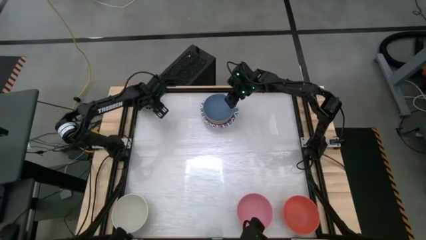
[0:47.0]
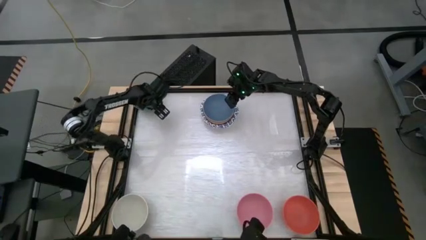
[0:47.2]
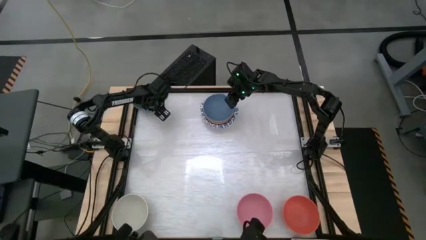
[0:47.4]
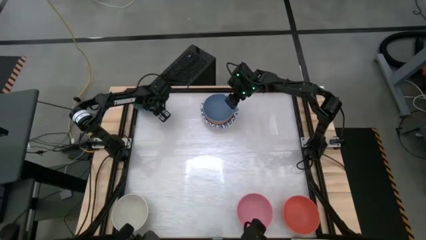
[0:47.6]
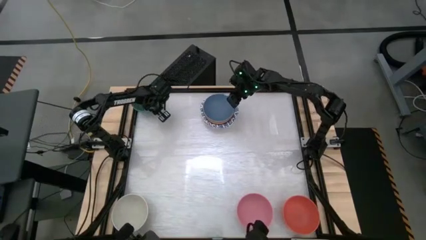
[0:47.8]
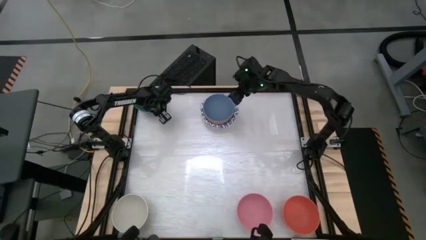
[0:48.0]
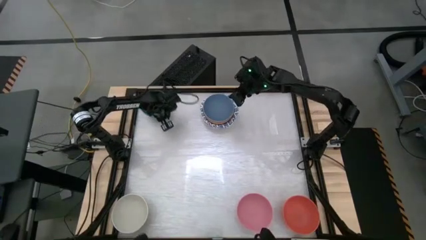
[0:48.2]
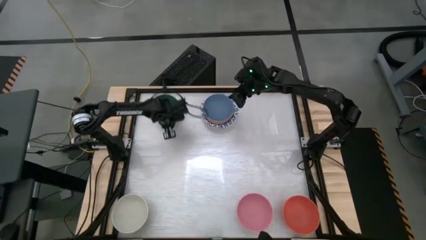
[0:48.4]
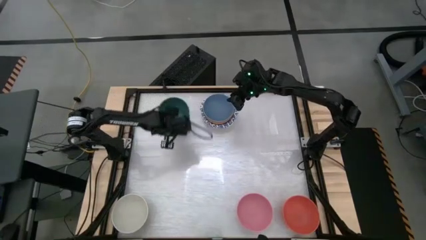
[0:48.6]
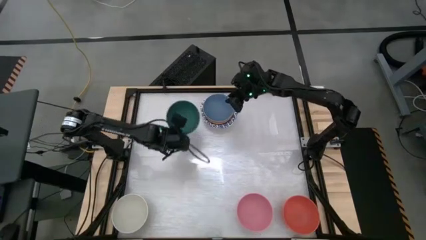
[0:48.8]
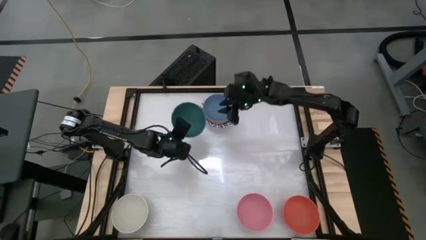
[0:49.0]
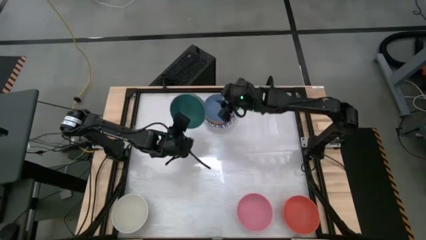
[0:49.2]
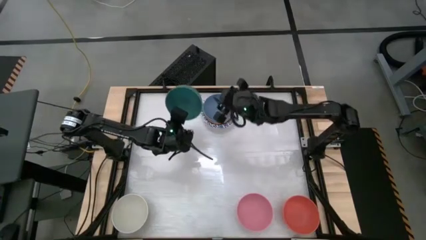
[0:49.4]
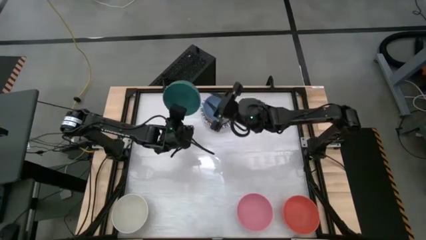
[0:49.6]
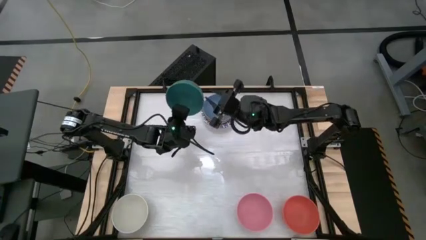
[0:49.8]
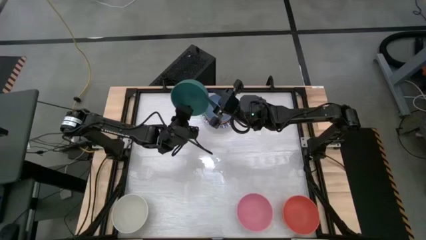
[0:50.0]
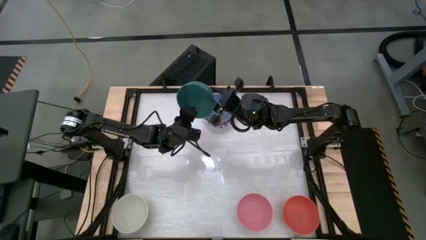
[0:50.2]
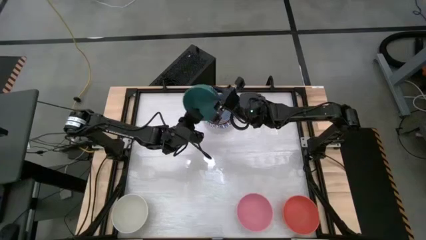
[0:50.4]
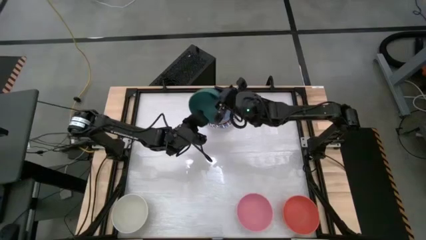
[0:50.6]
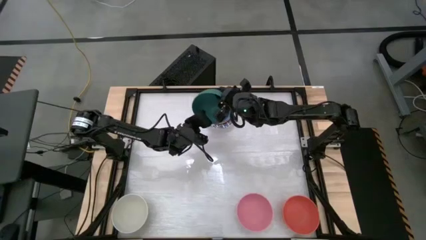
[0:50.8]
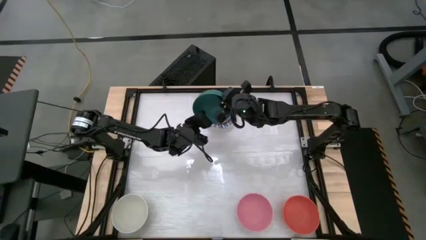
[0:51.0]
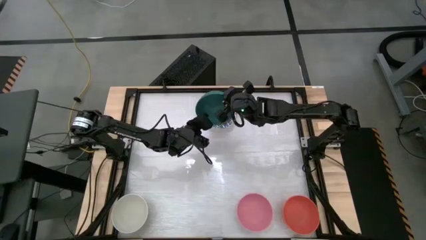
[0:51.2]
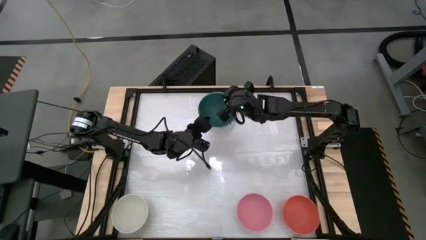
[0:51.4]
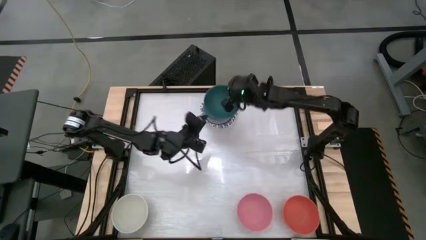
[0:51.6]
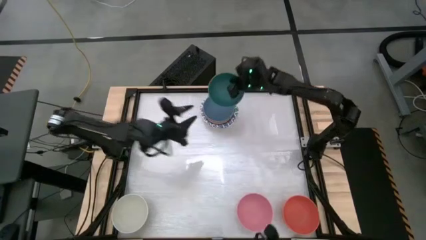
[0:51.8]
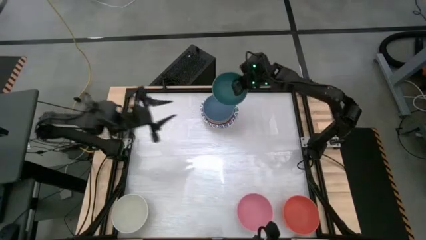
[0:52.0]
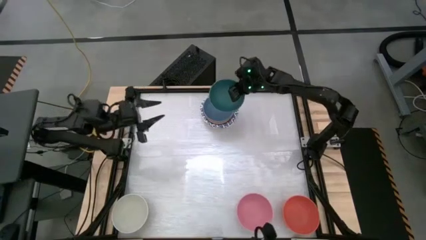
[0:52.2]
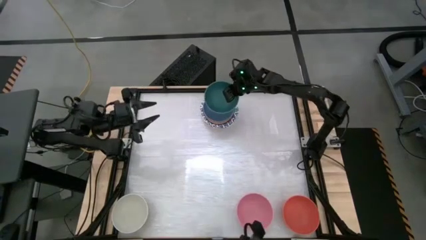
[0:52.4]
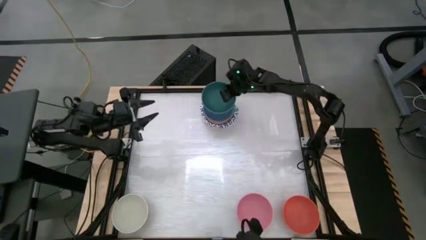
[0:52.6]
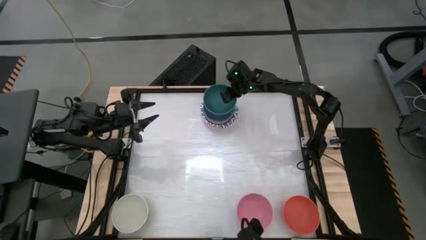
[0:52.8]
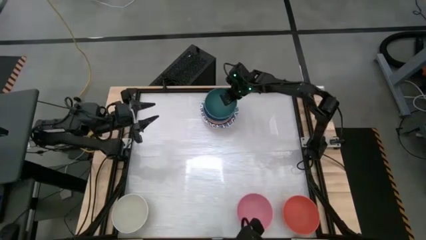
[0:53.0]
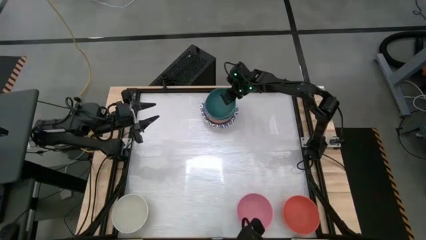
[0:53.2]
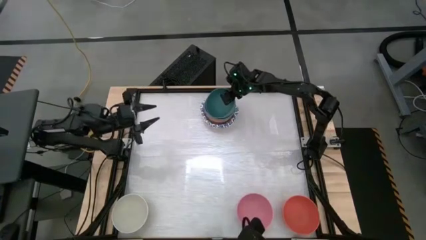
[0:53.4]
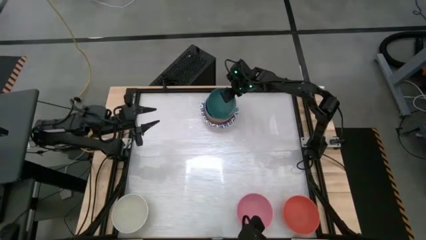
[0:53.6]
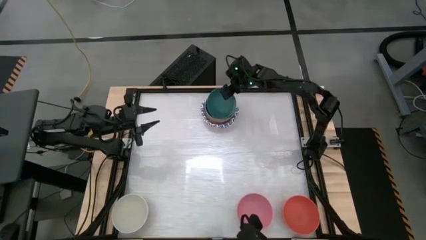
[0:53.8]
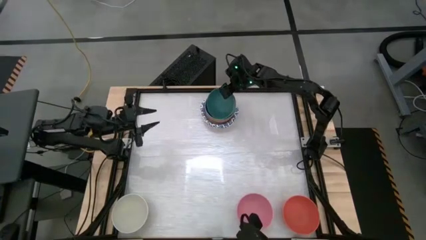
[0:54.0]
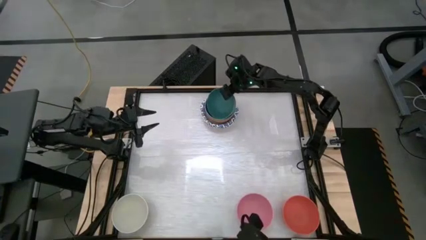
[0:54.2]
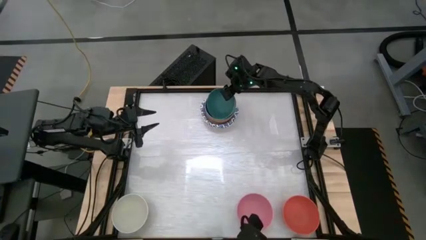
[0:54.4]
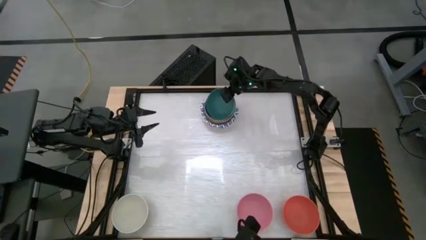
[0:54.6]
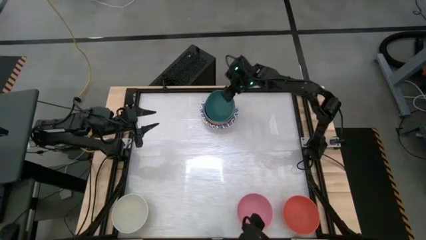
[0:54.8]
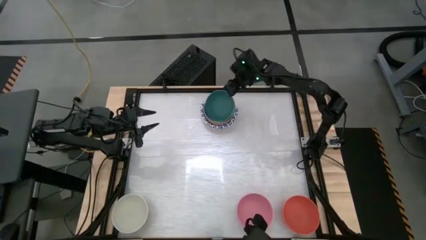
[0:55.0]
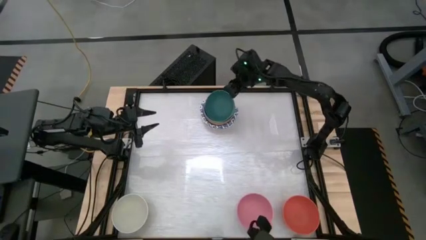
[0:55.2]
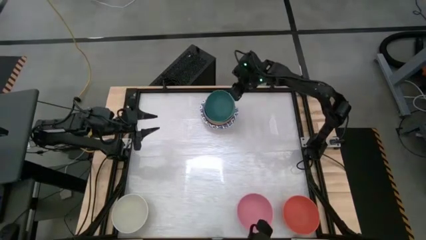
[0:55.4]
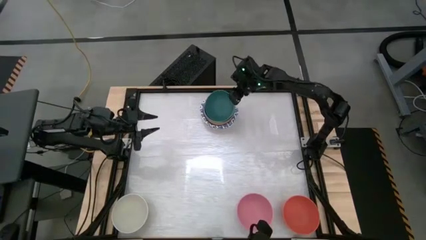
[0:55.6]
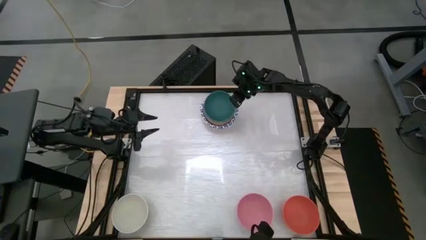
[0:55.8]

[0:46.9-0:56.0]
Stack the green bowl on top of the blue bowl

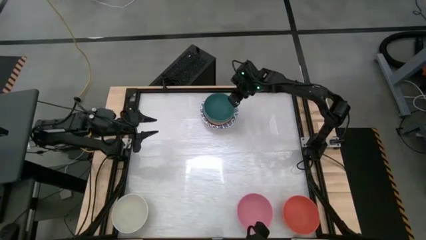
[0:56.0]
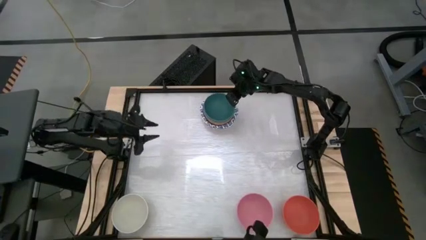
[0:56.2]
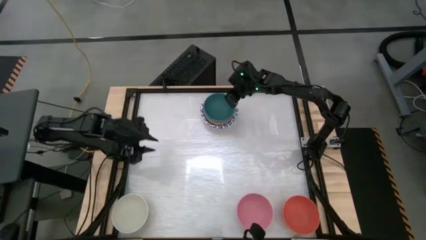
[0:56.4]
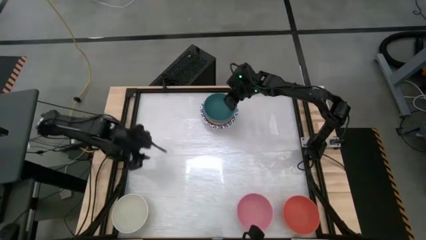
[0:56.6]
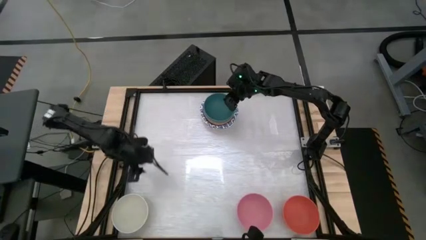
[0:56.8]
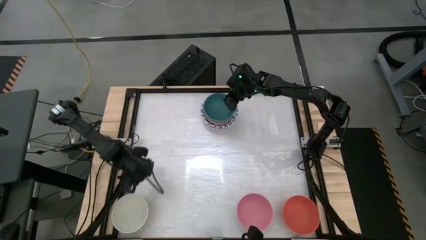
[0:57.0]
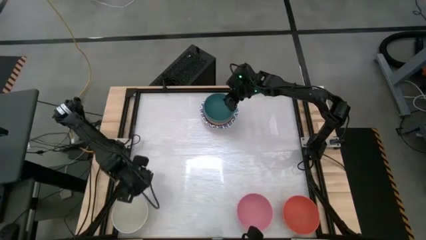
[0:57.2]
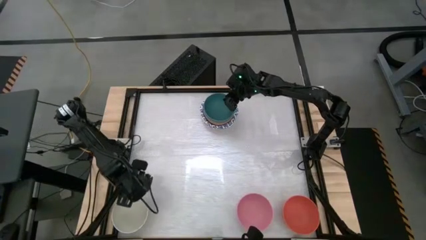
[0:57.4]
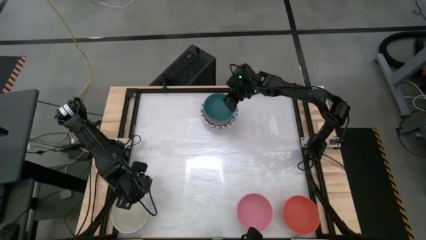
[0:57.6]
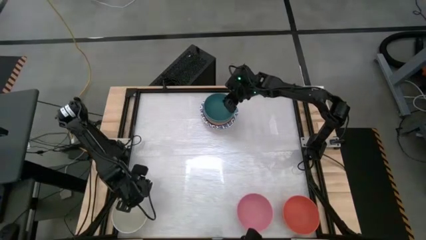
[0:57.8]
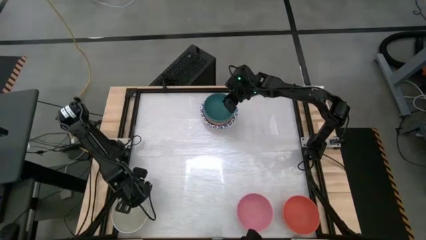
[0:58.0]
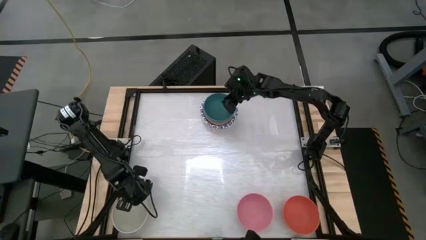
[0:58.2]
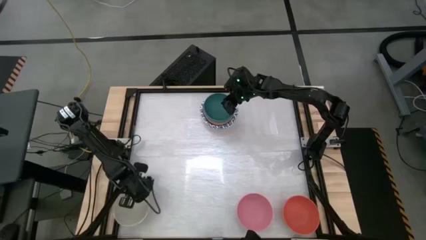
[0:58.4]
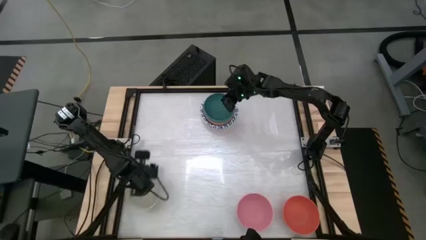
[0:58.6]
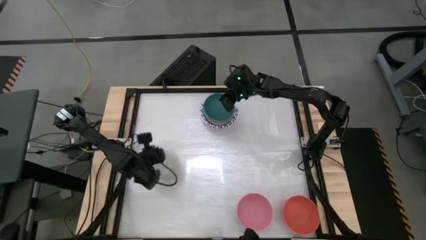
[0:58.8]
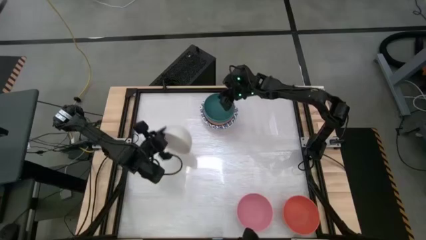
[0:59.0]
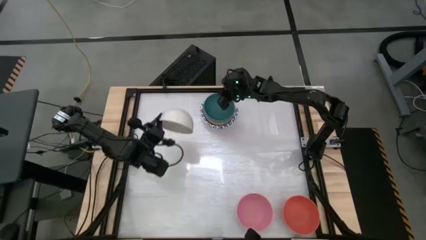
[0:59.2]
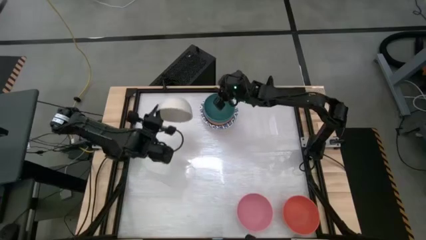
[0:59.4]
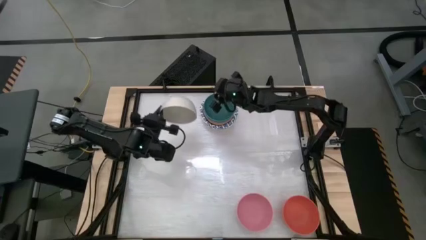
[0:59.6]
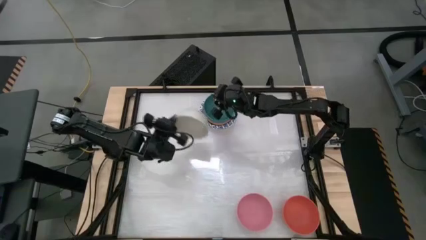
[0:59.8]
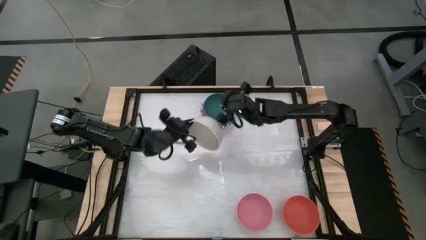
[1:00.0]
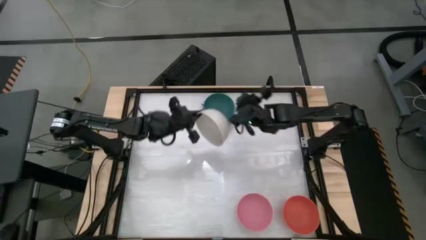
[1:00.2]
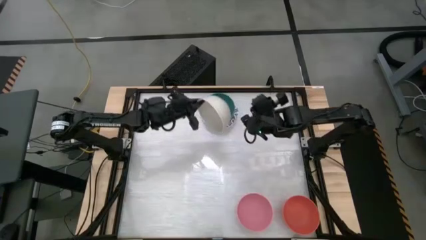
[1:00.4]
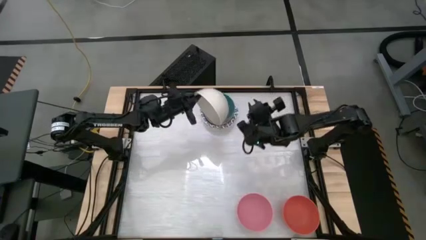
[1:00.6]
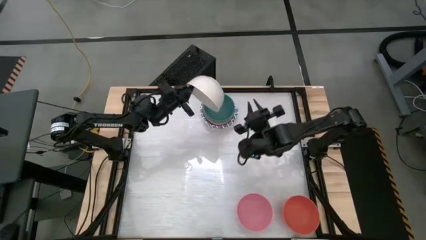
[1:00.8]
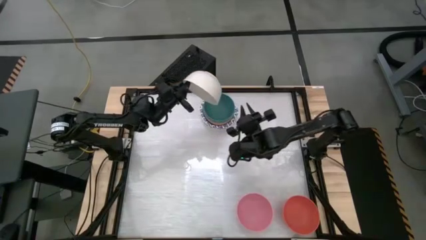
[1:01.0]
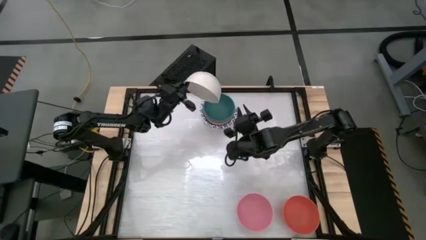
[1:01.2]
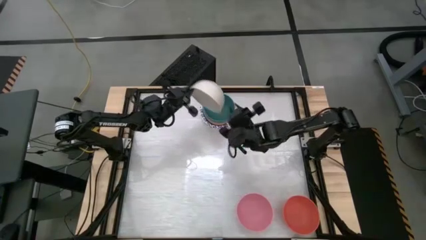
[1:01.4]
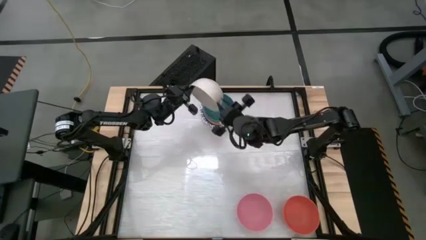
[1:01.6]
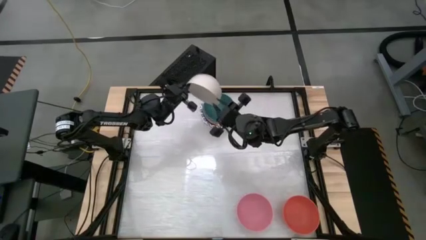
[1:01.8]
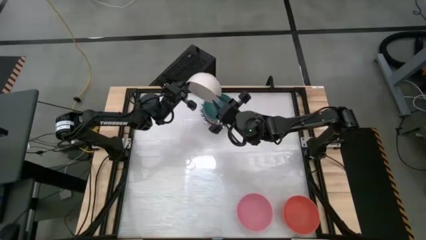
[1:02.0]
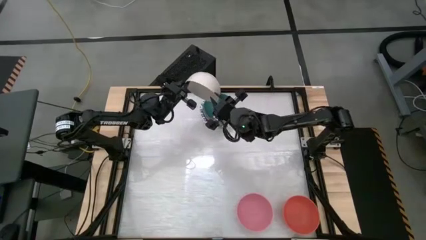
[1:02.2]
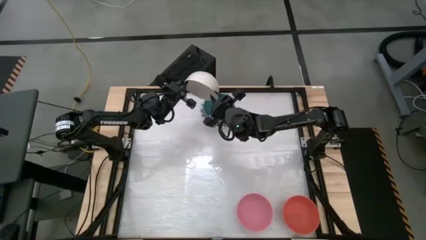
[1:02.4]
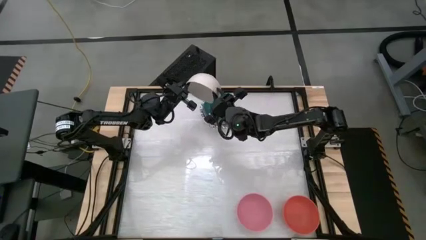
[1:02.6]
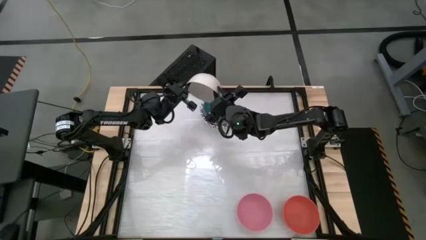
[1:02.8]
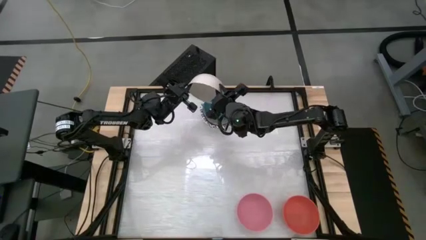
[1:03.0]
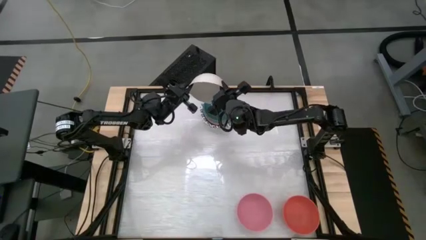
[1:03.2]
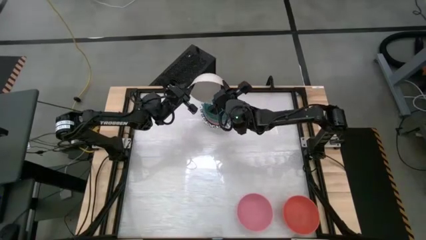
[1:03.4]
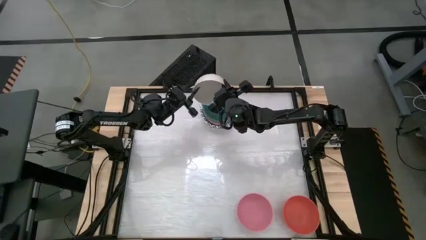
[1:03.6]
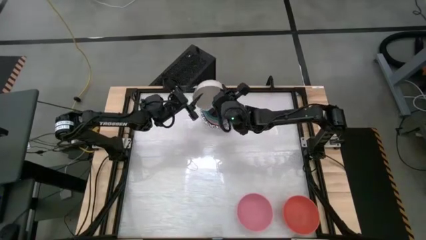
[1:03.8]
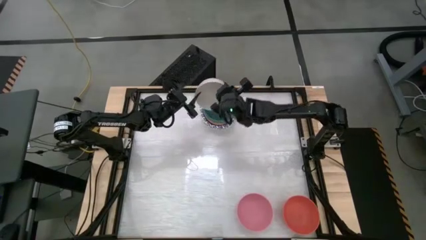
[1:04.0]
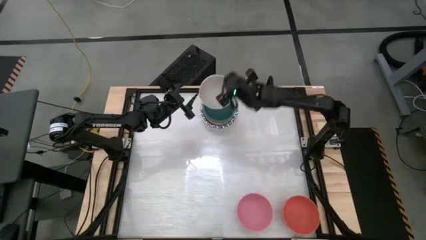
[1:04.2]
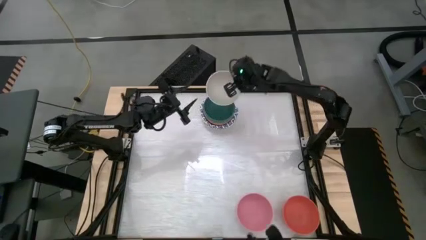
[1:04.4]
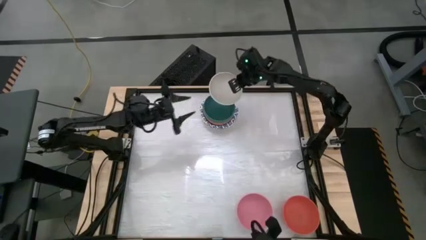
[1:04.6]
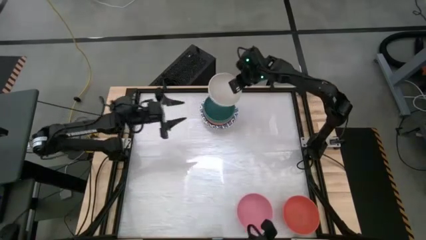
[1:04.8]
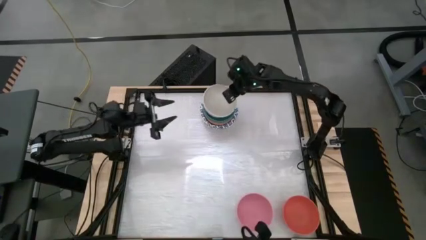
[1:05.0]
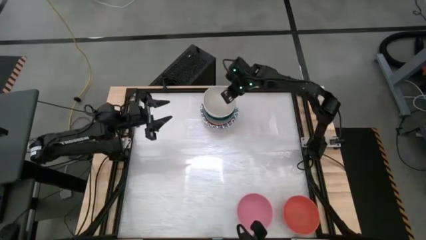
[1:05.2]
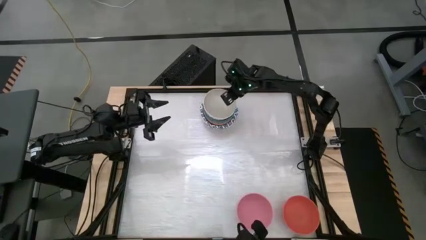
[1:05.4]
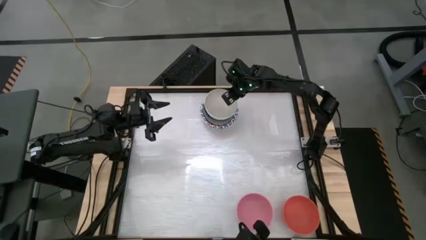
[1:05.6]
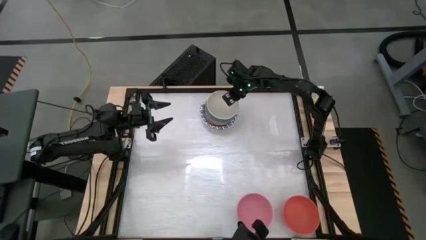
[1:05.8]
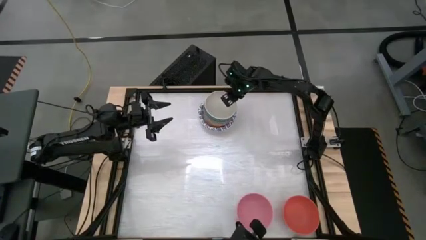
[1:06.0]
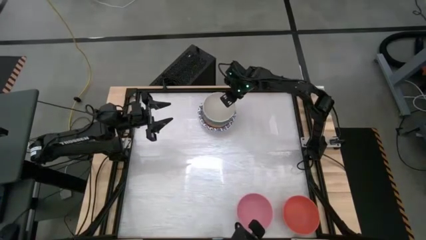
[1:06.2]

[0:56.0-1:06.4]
Stack the white bowl on top of the green bowl
